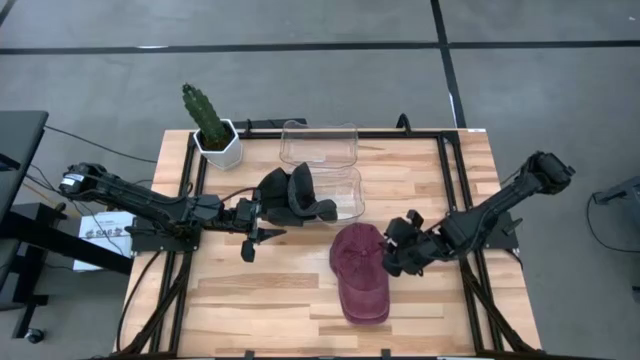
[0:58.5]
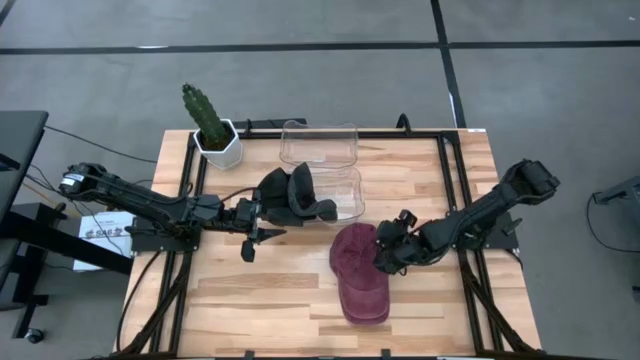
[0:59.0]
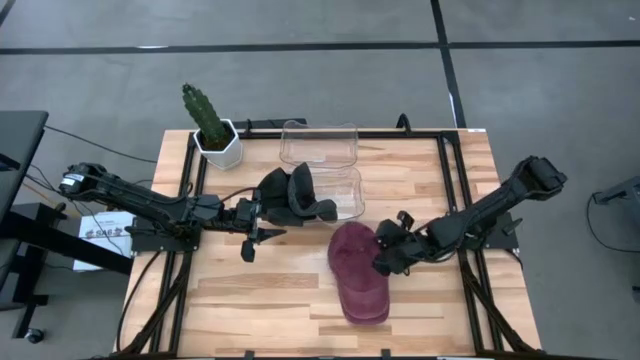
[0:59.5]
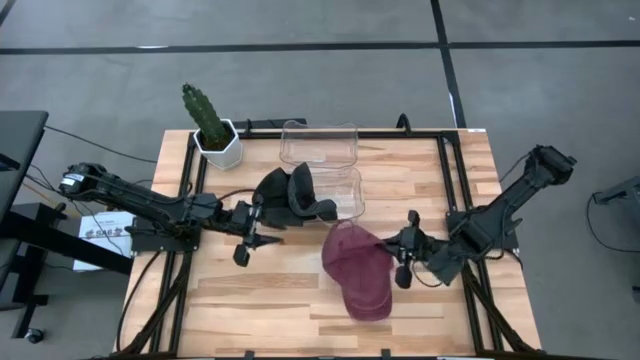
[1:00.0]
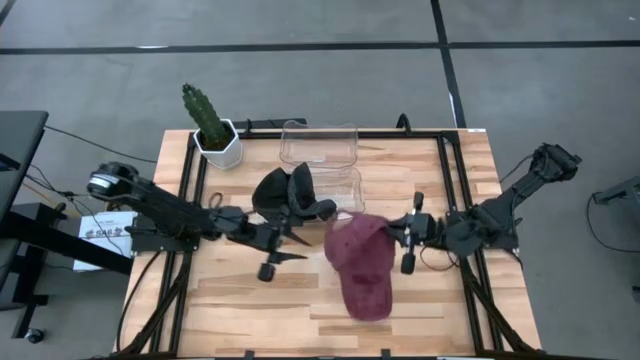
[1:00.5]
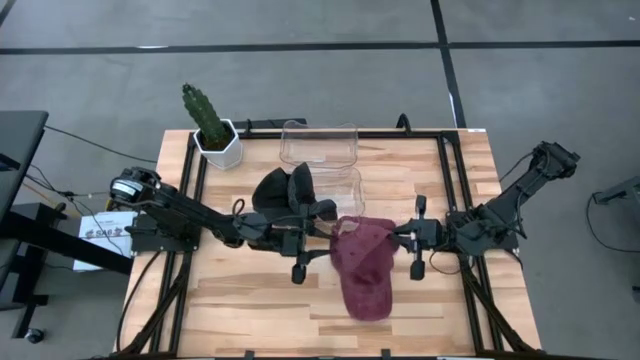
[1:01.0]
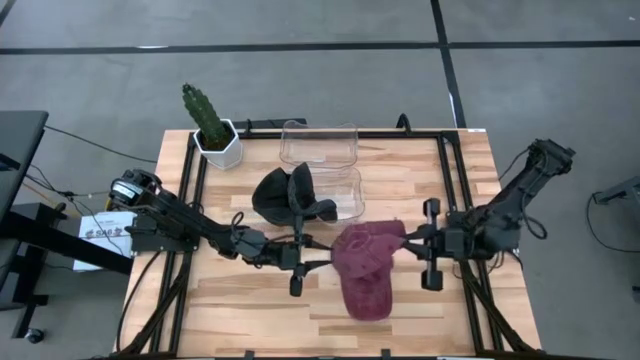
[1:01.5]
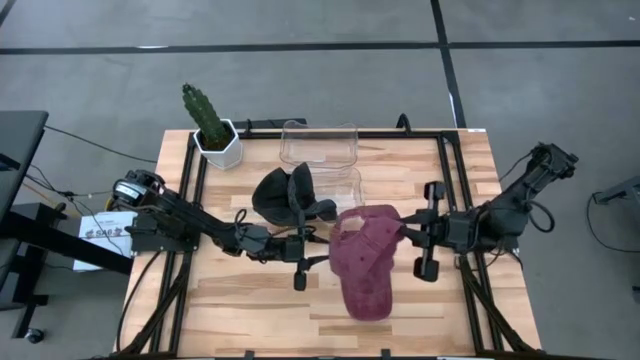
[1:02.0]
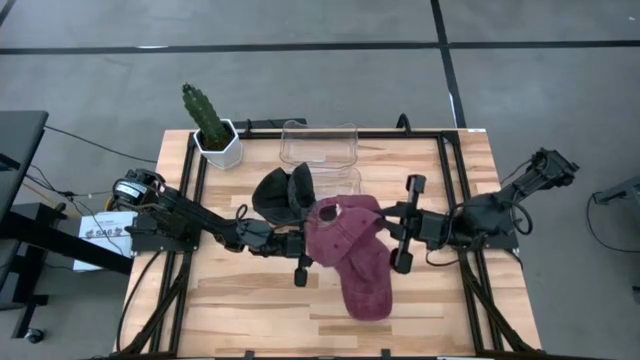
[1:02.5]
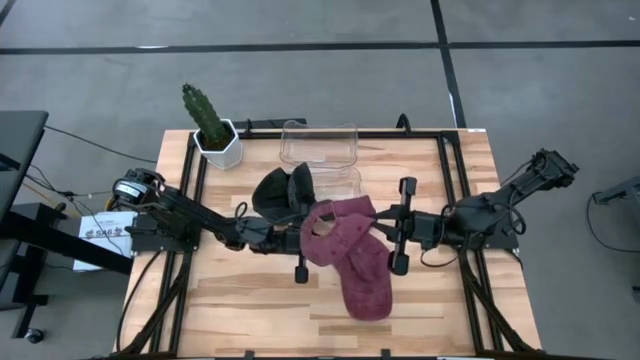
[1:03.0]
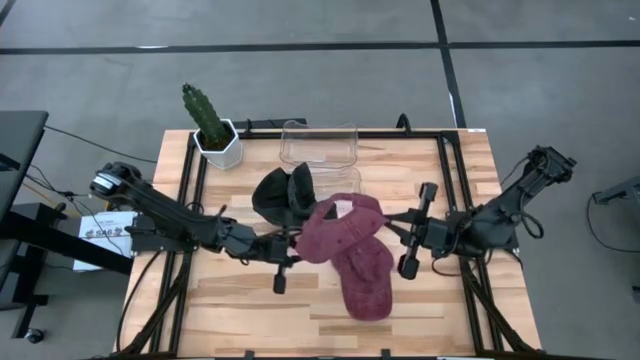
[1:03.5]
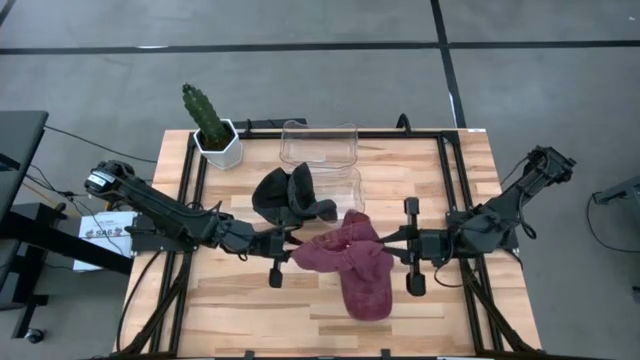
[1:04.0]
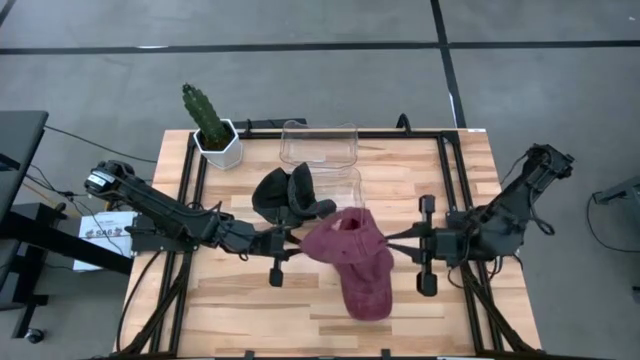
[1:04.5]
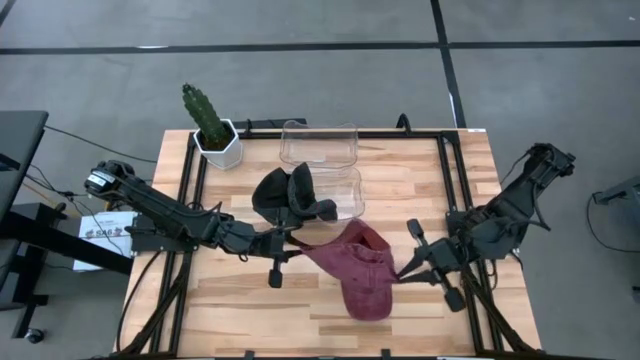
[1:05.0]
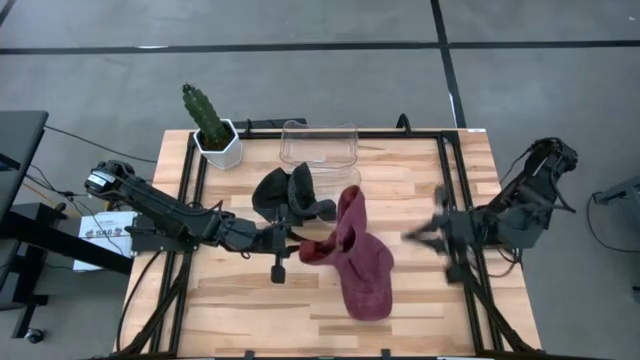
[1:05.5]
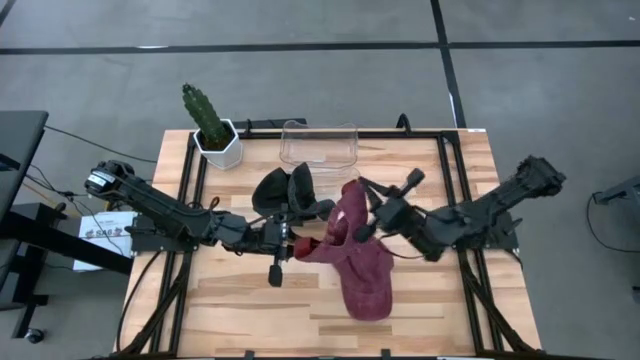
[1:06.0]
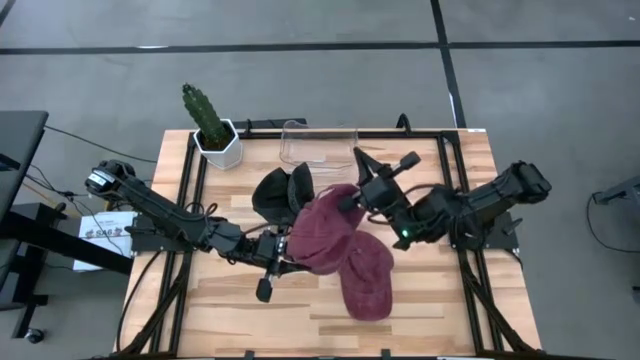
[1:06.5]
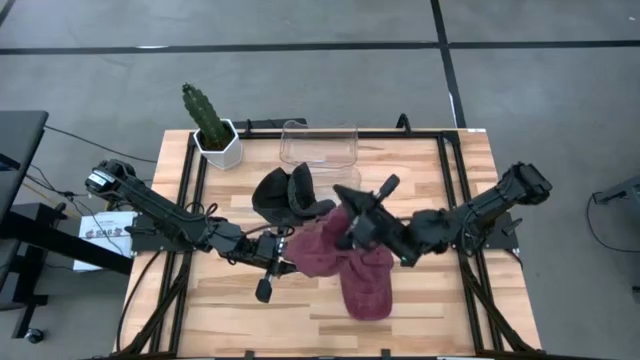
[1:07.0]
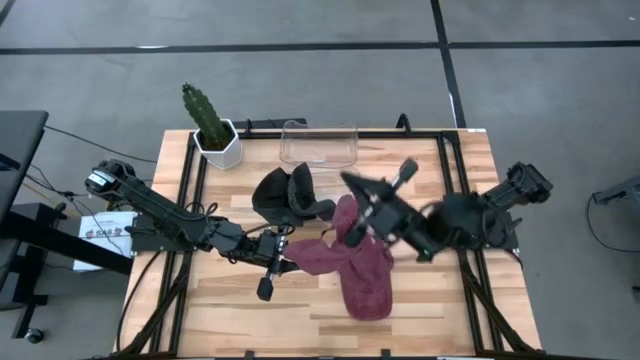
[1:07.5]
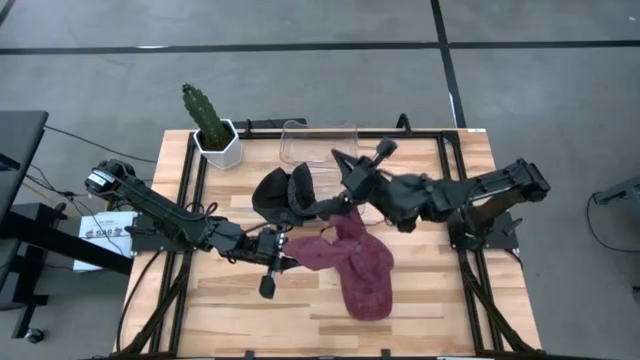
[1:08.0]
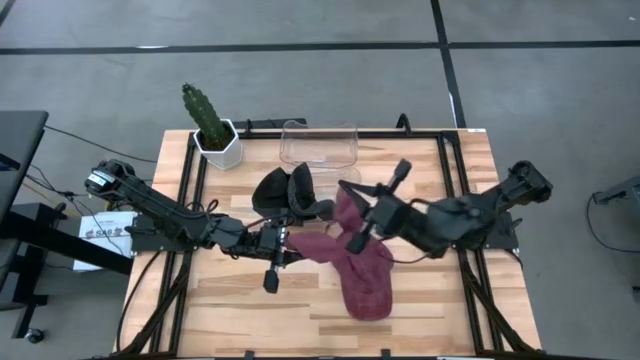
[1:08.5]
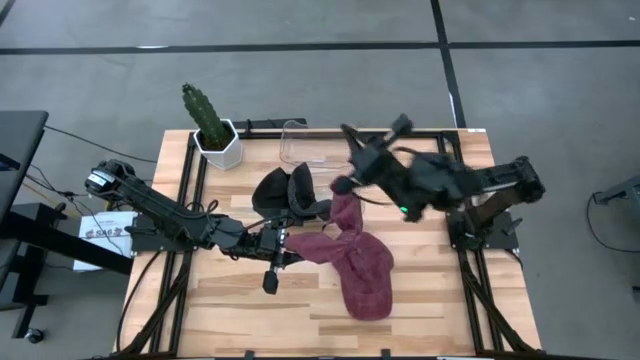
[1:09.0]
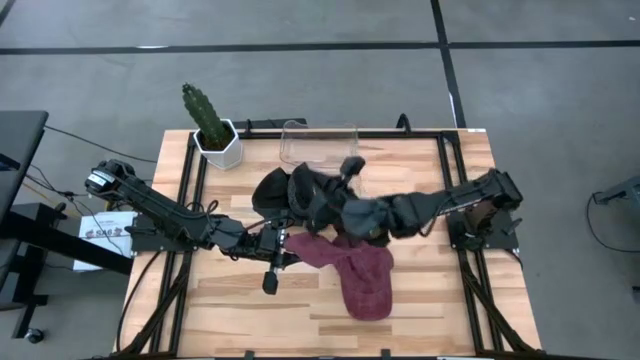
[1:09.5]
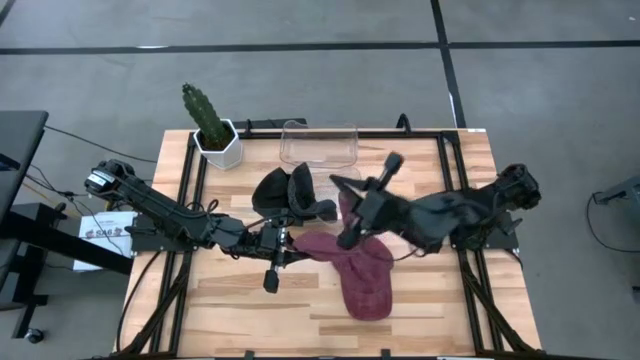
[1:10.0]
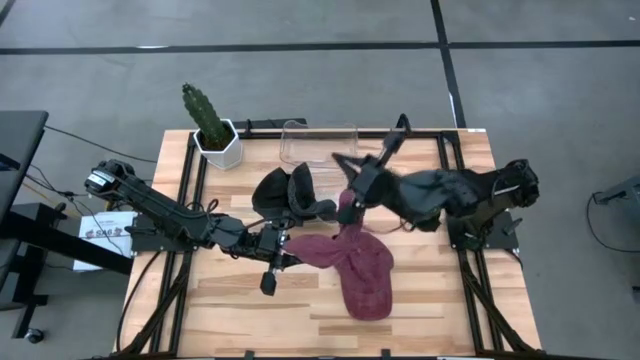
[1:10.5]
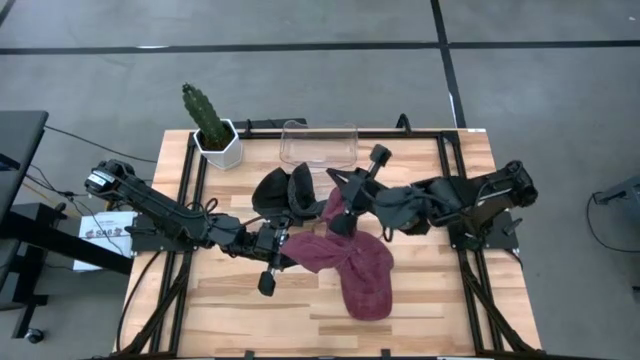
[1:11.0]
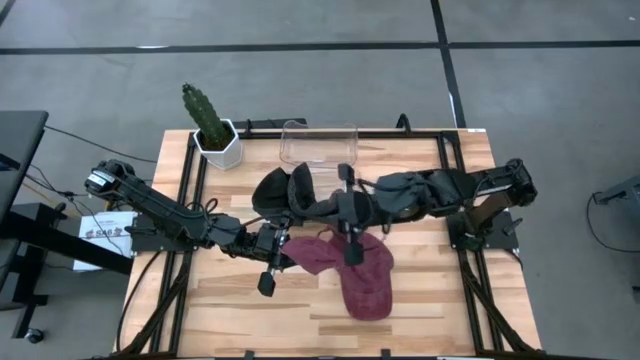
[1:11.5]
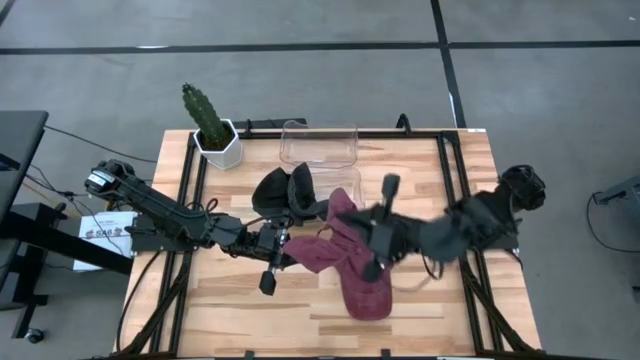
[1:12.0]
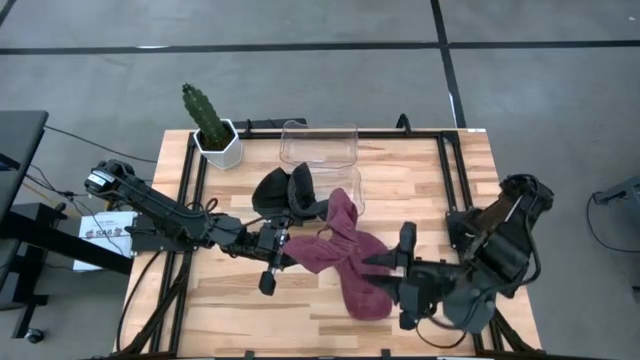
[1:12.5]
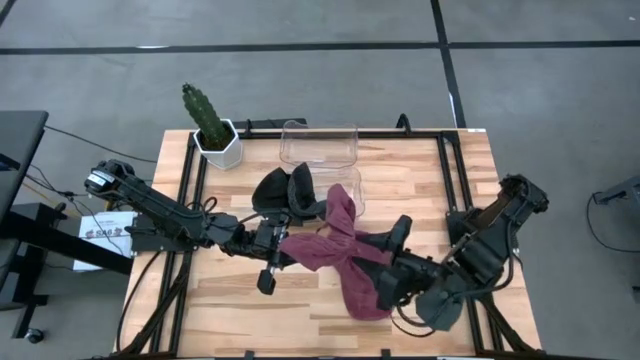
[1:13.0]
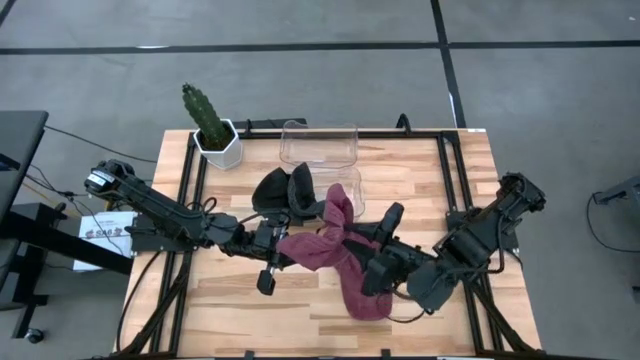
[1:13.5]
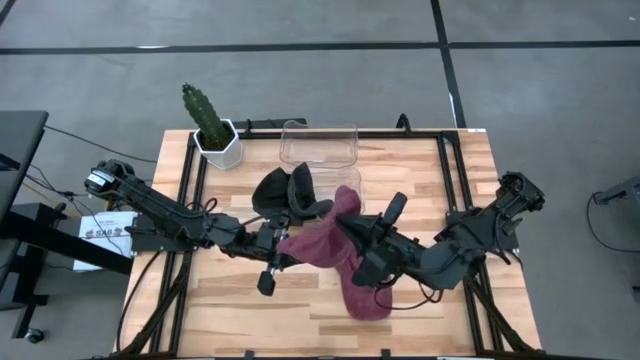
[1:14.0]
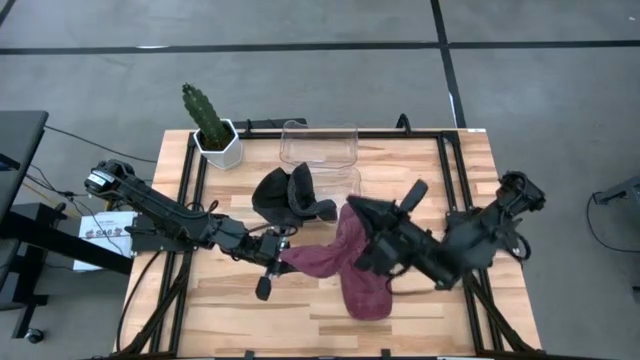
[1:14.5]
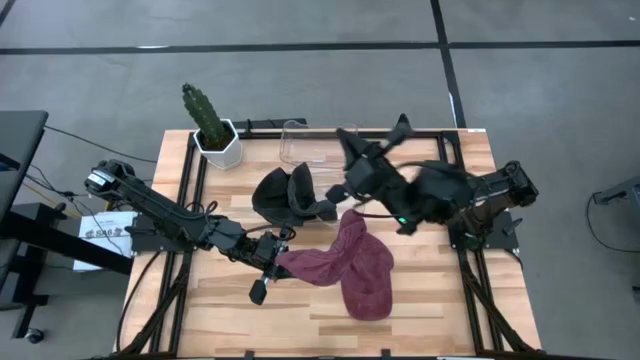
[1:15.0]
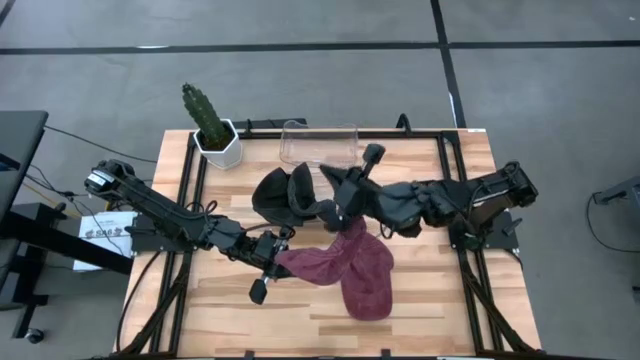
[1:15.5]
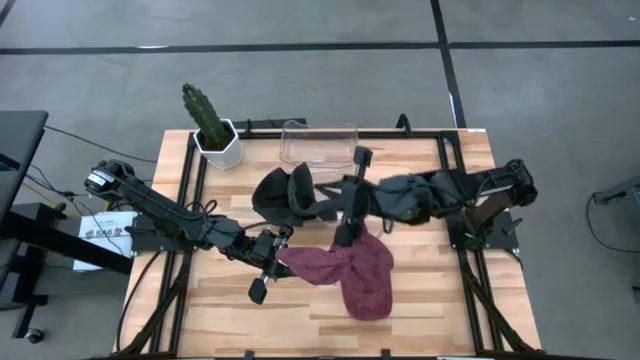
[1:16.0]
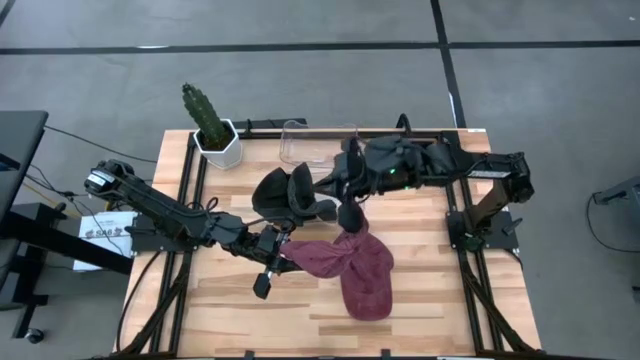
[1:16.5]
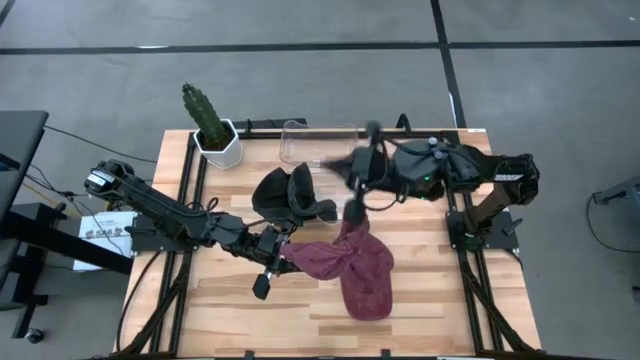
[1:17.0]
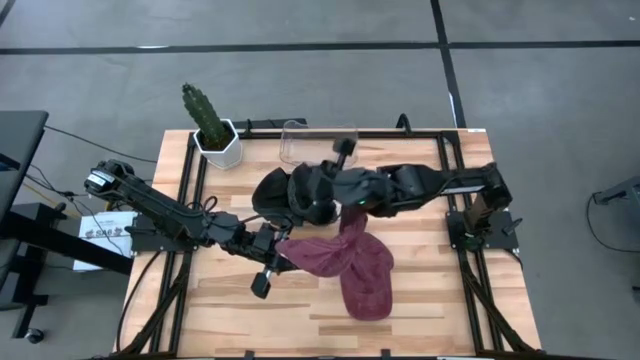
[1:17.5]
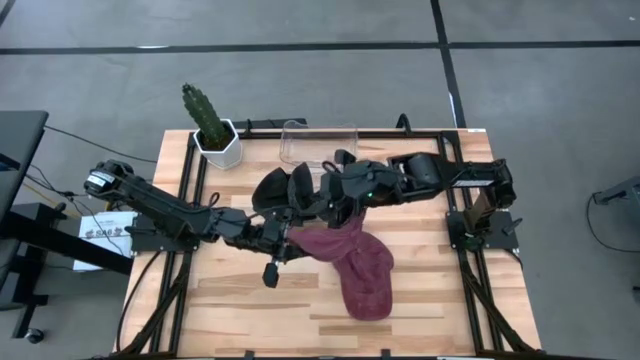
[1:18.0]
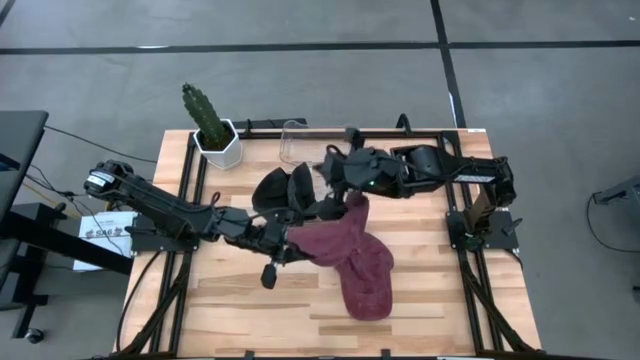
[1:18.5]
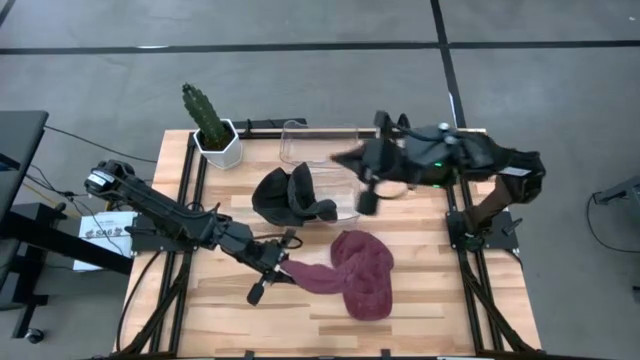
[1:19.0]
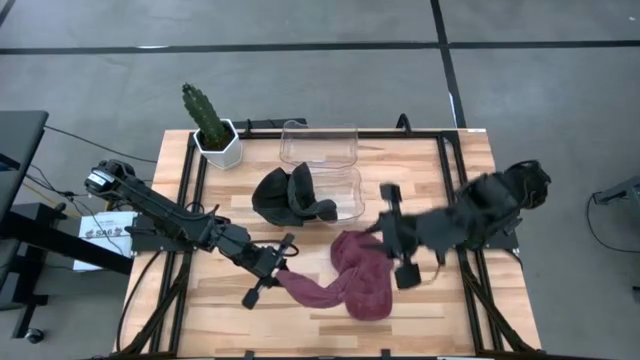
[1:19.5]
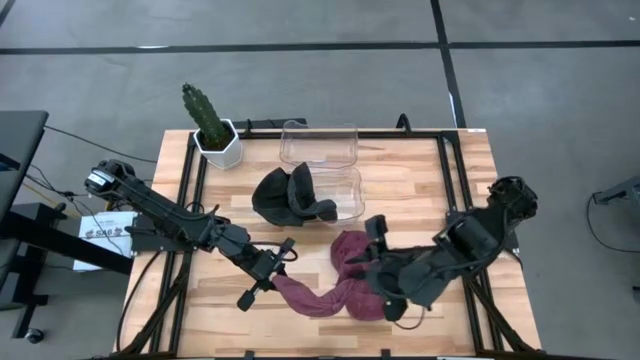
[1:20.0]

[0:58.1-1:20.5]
Task: Pick & Place hat
Put the top red cap into the top transparent bin
